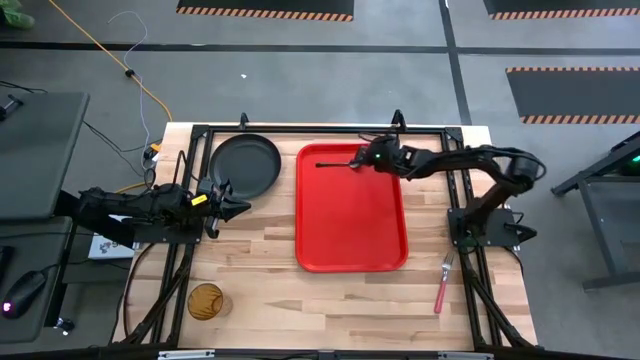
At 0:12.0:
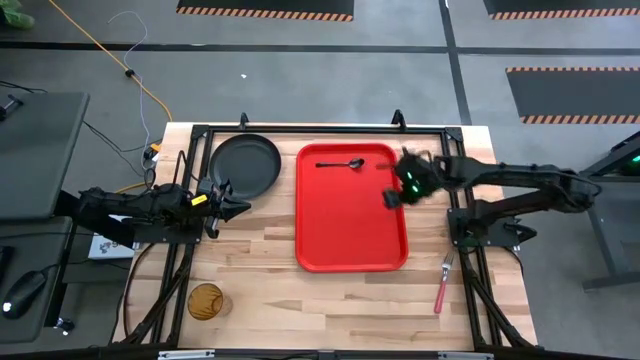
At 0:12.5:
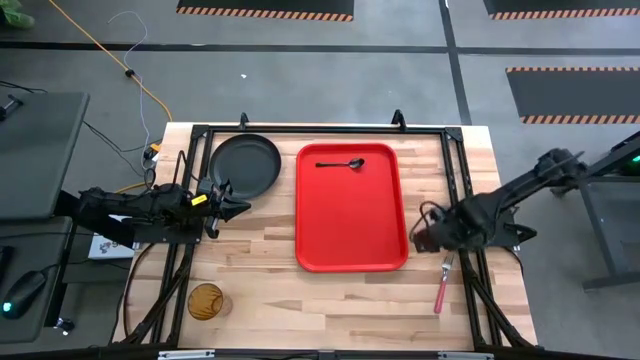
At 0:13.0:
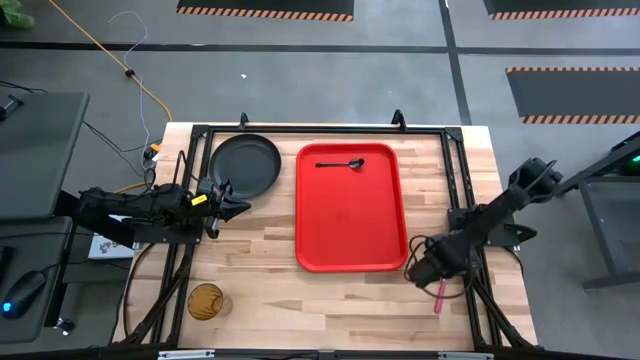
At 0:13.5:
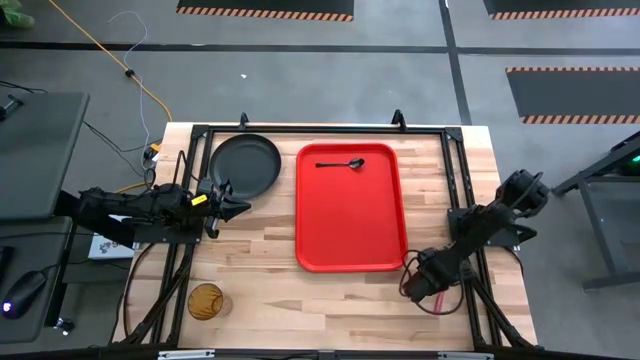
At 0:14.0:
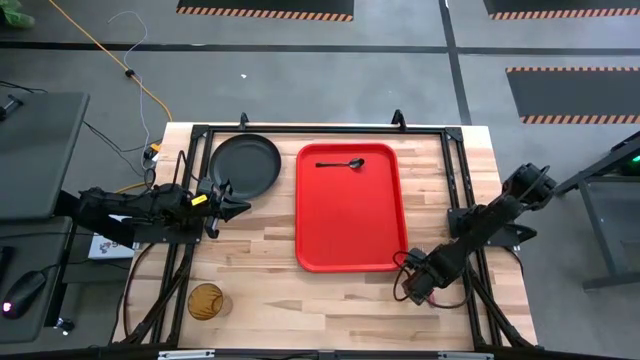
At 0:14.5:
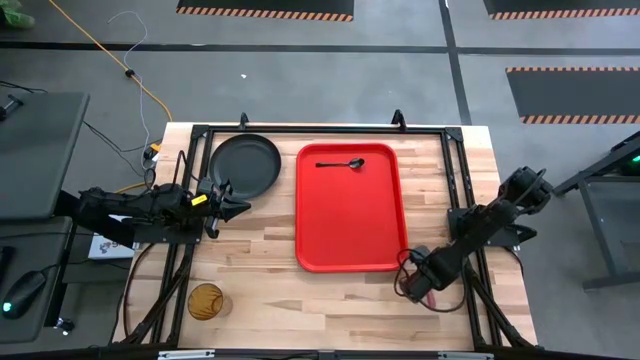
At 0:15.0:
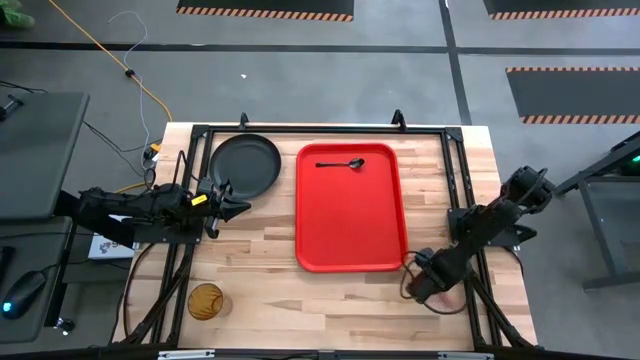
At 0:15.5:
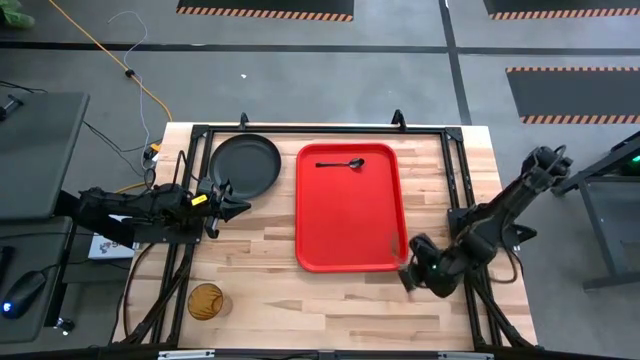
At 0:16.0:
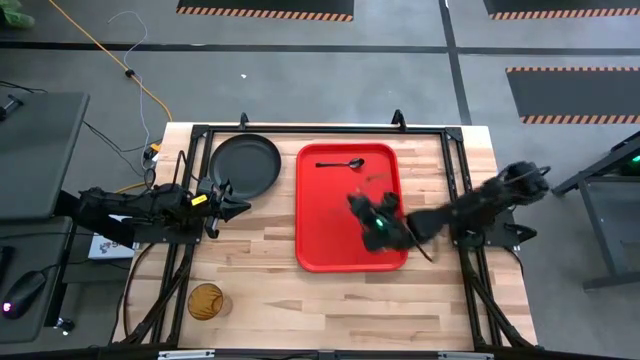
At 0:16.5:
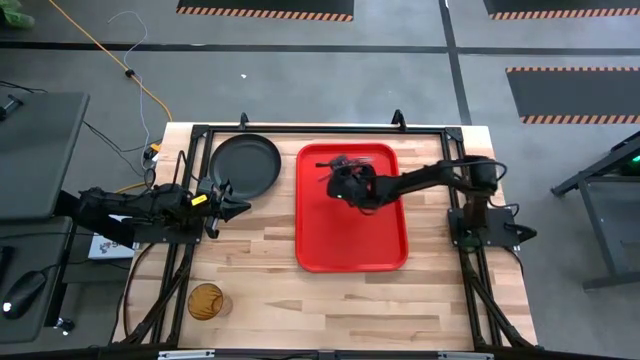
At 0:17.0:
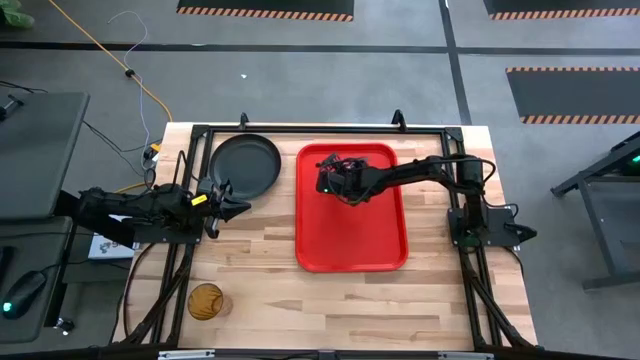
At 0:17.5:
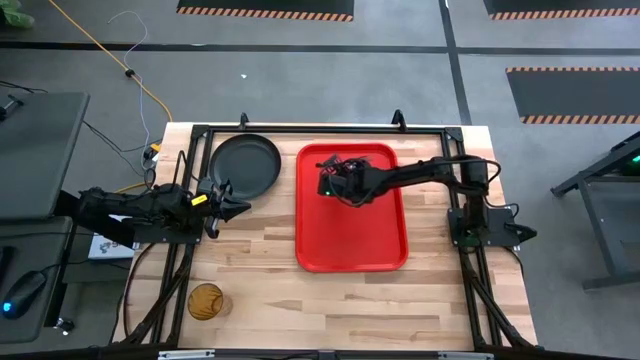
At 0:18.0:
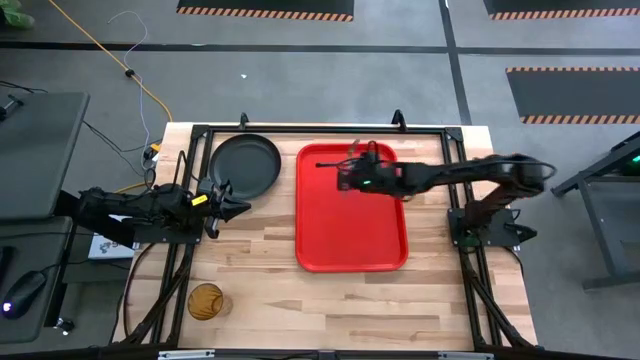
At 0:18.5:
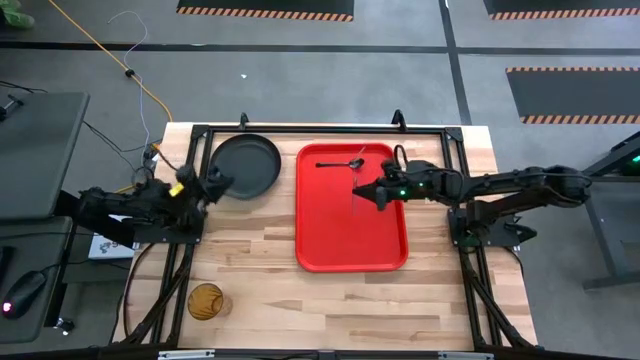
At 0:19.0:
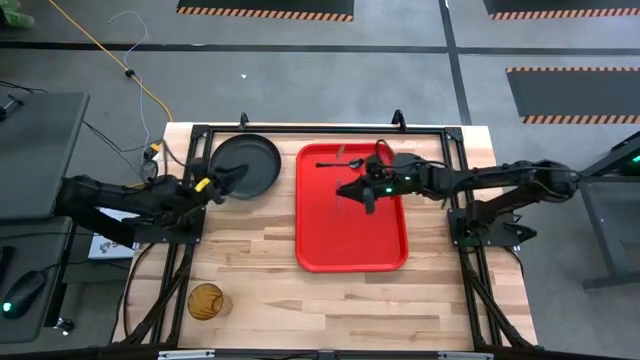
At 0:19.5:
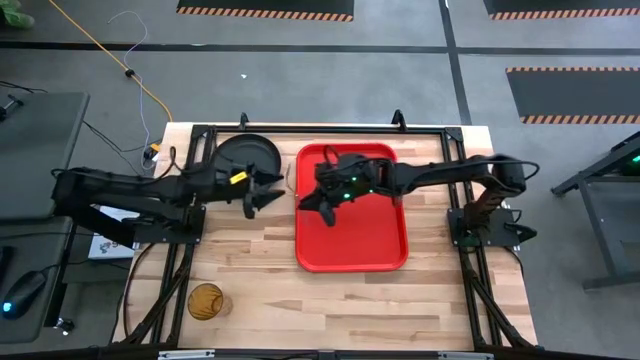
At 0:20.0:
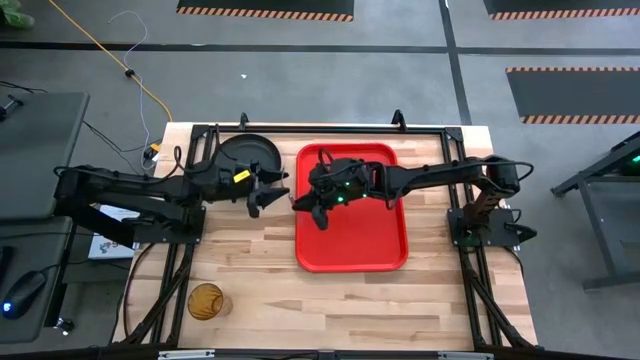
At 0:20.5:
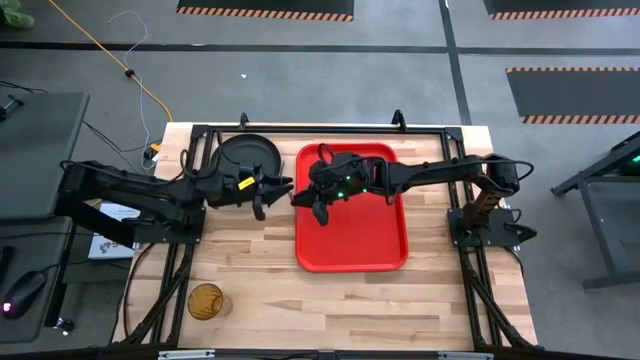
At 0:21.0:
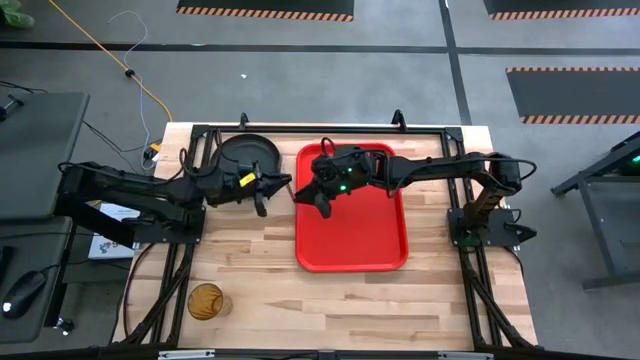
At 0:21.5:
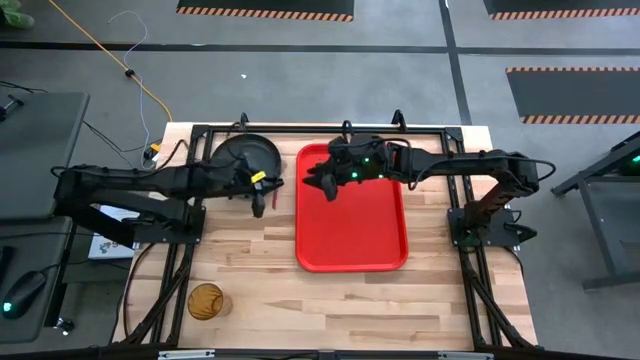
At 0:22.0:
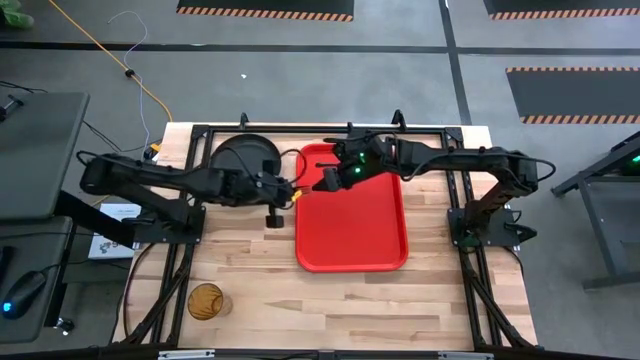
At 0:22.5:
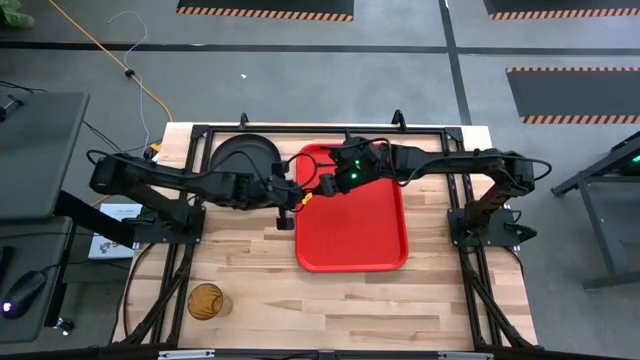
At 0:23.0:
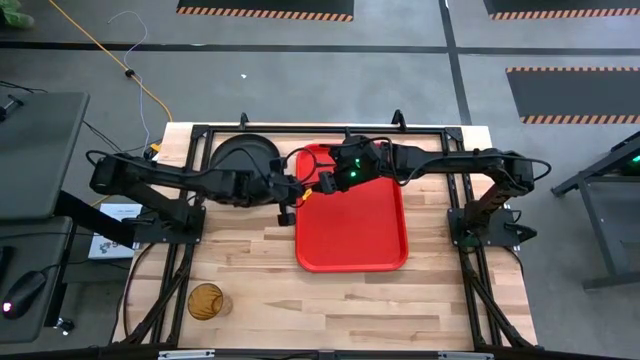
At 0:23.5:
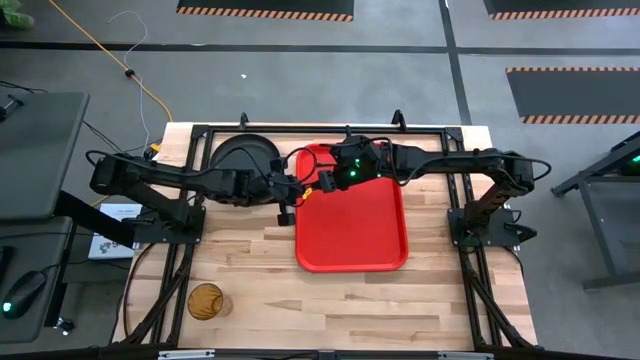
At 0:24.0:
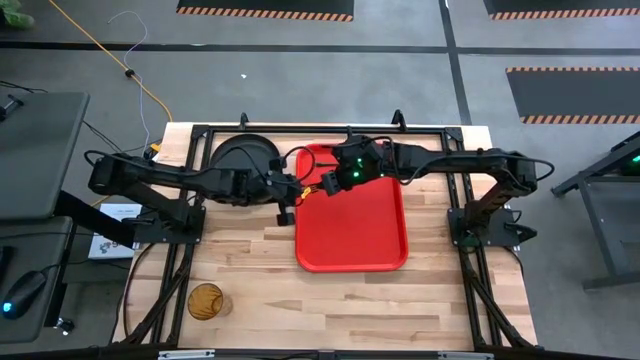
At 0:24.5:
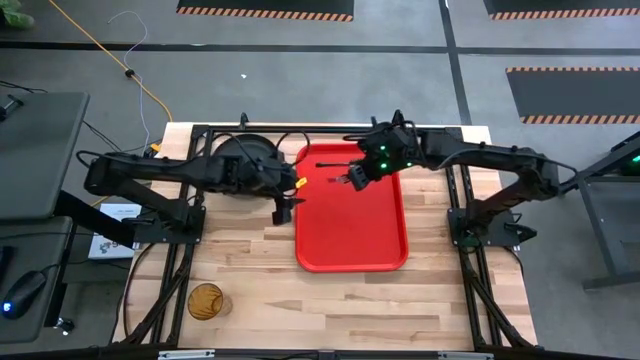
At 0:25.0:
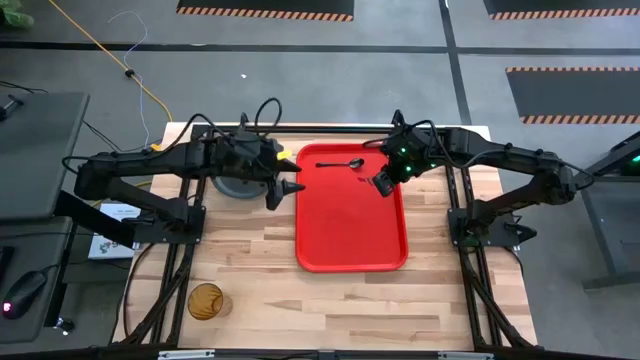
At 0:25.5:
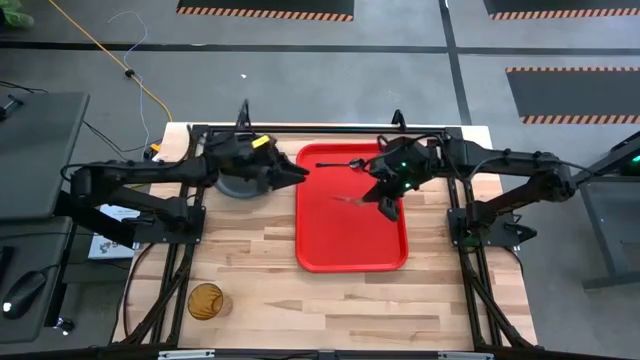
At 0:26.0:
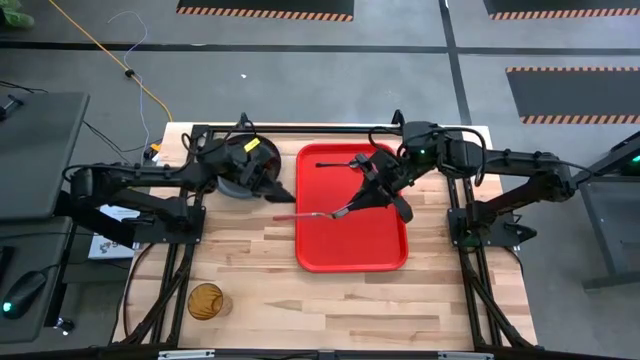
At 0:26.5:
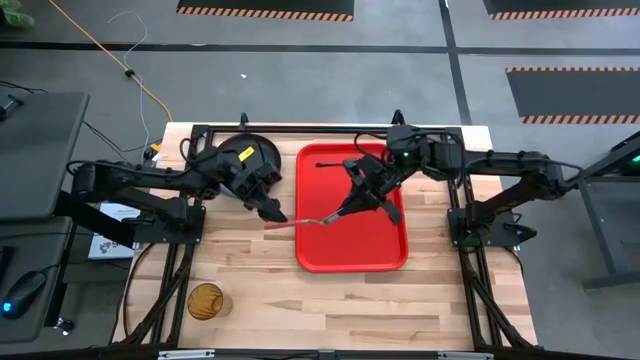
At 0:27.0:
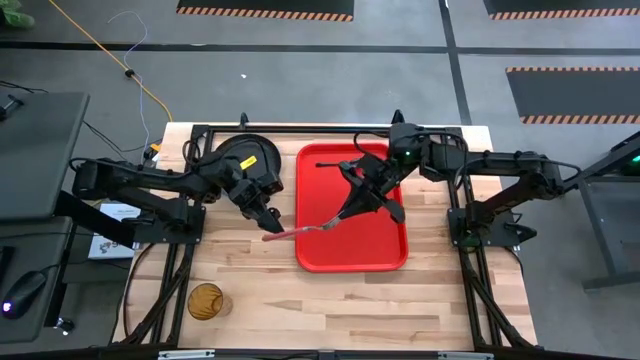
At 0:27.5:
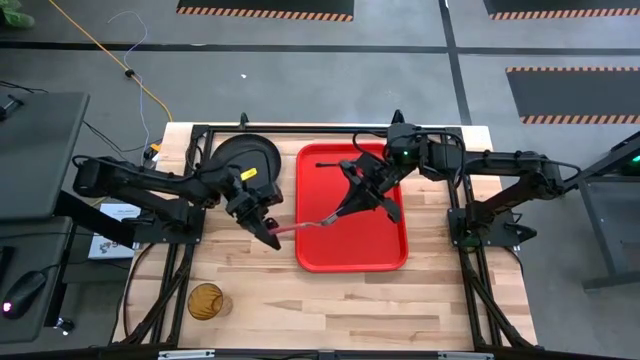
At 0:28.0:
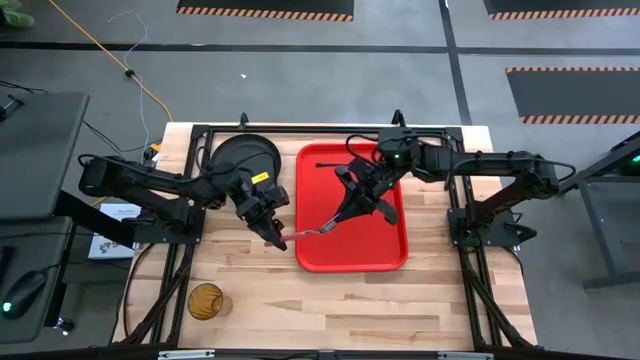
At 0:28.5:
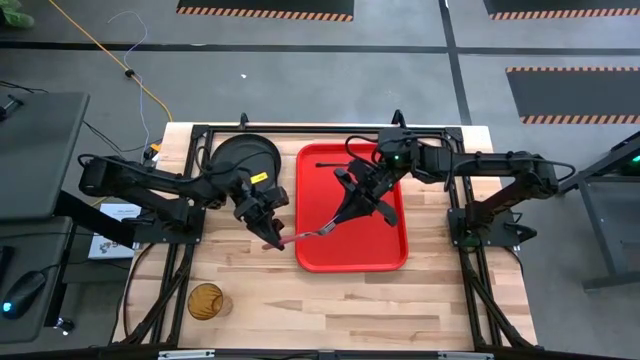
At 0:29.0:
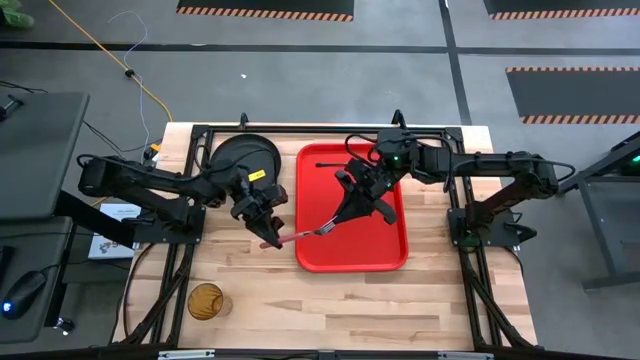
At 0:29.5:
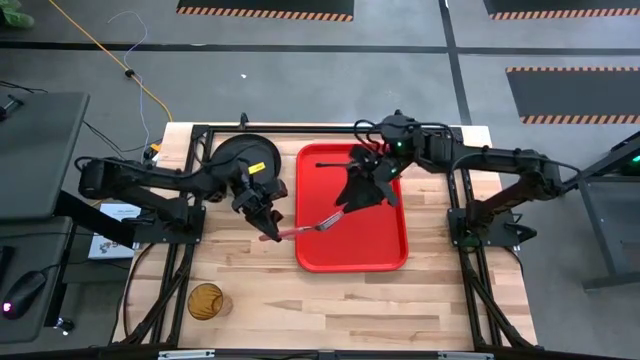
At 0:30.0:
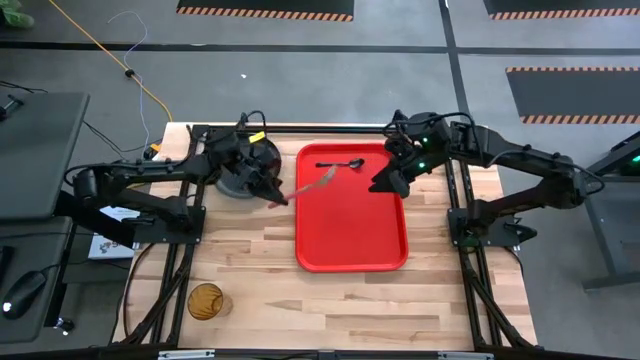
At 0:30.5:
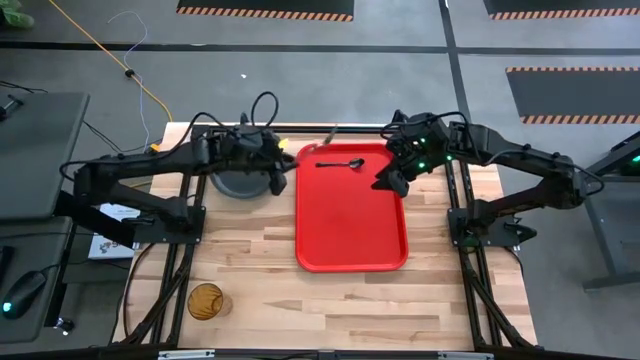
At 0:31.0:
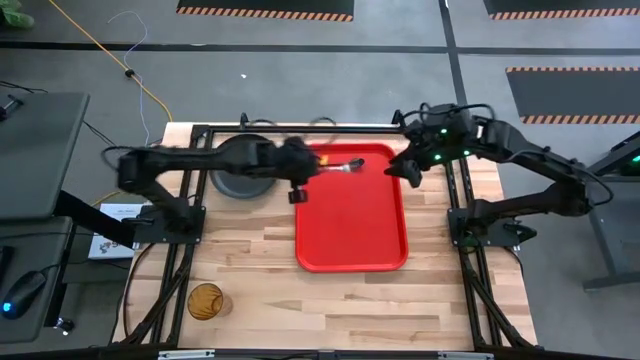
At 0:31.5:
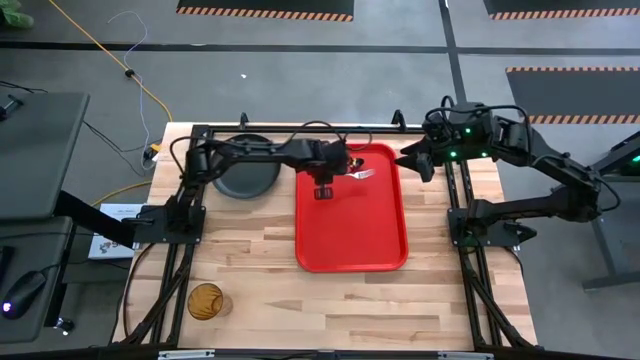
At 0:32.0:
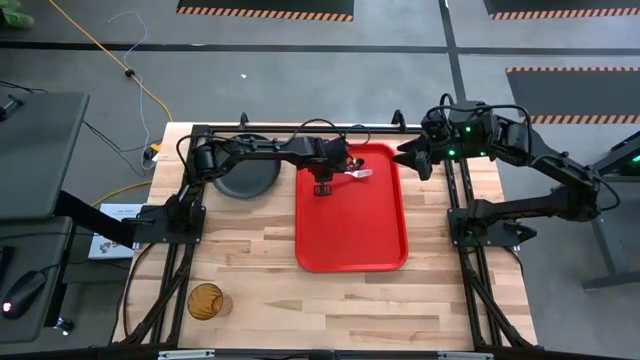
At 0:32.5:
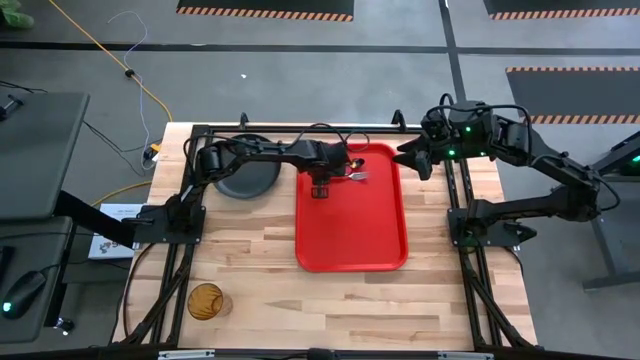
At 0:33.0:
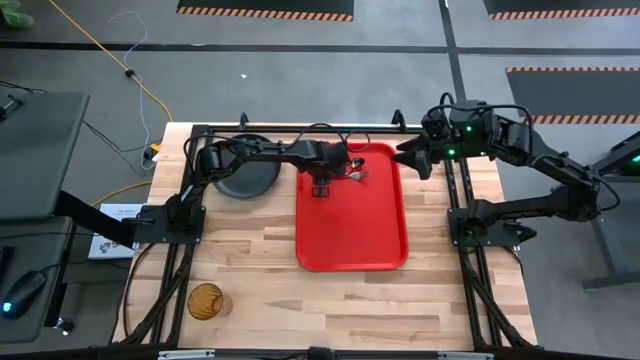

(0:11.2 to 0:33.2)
Task: Pick and place plate/cup/fork/spoon on tray
Put the pink fork on the red tray to the bottom of the black spoon
